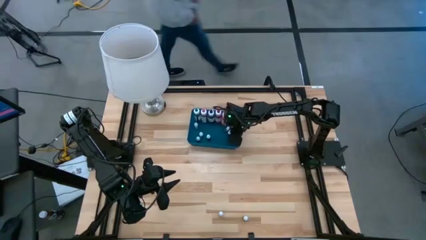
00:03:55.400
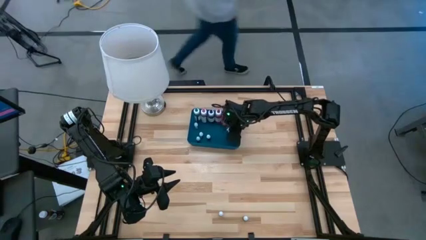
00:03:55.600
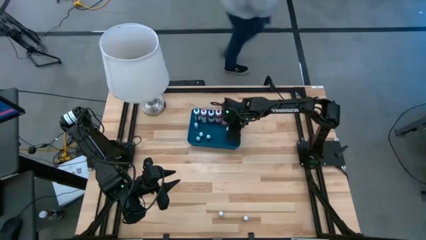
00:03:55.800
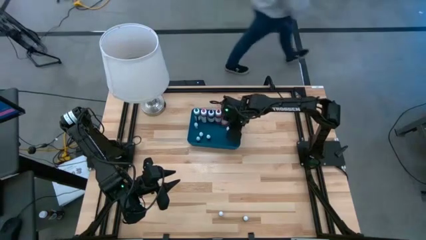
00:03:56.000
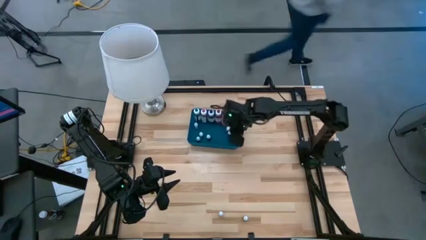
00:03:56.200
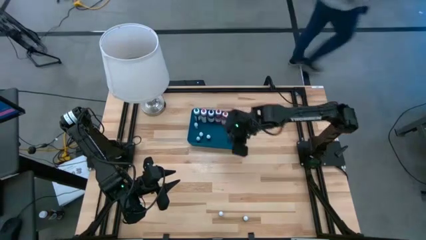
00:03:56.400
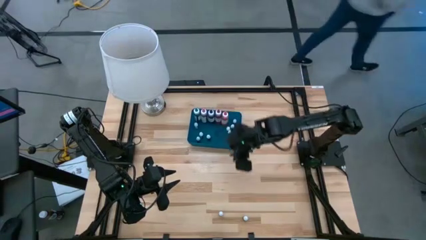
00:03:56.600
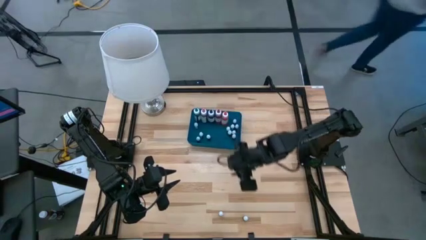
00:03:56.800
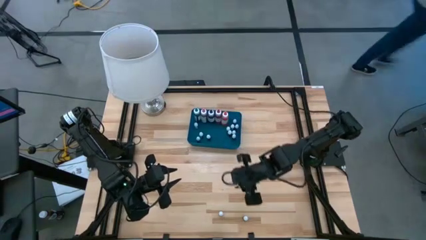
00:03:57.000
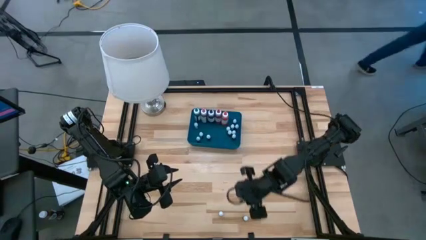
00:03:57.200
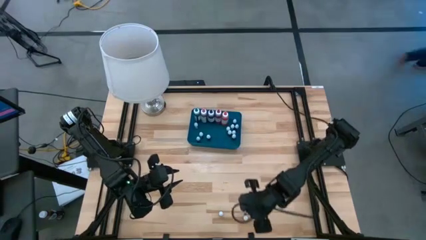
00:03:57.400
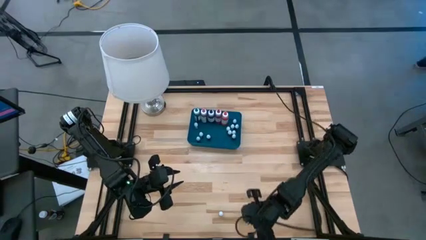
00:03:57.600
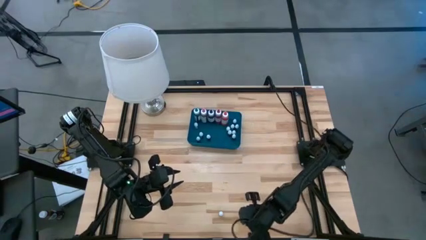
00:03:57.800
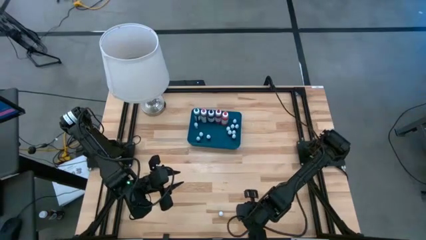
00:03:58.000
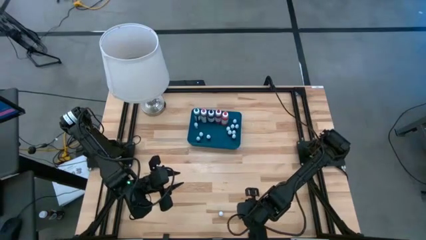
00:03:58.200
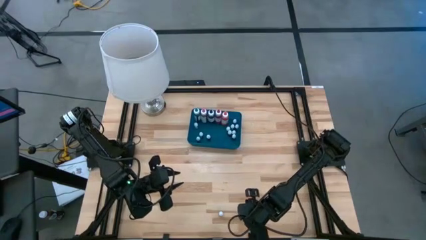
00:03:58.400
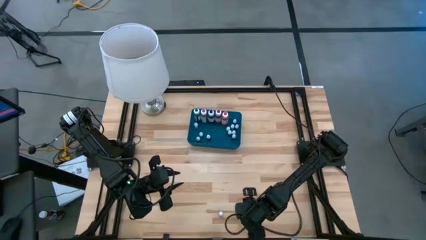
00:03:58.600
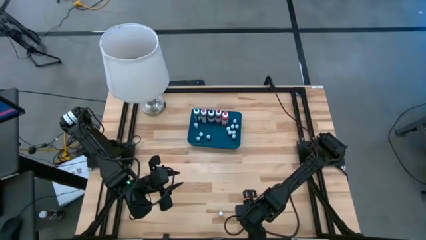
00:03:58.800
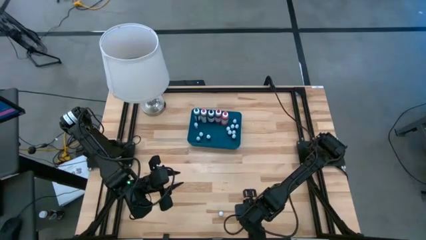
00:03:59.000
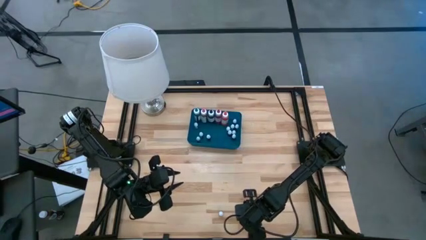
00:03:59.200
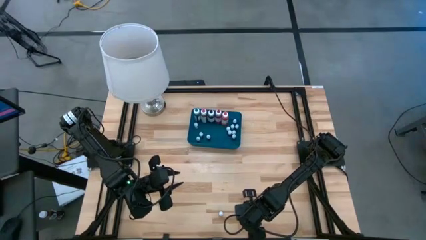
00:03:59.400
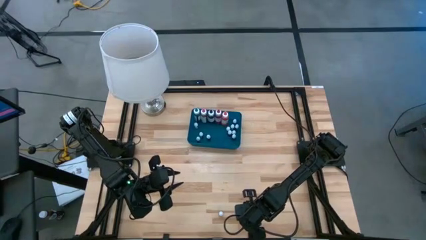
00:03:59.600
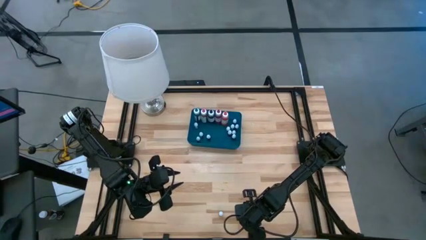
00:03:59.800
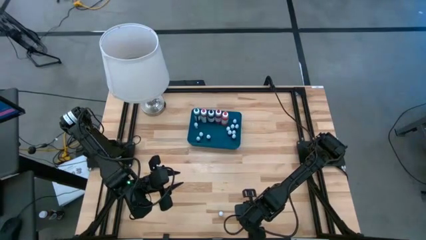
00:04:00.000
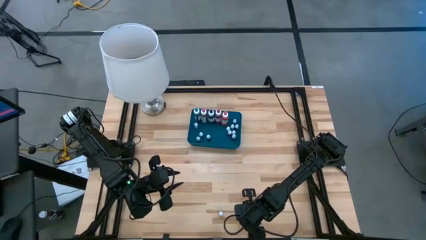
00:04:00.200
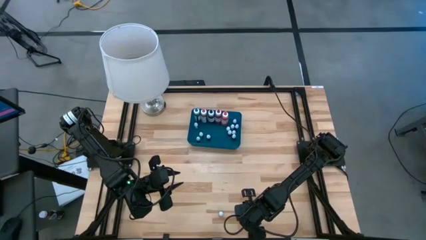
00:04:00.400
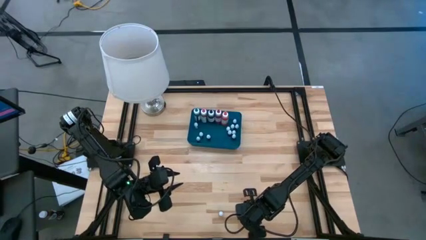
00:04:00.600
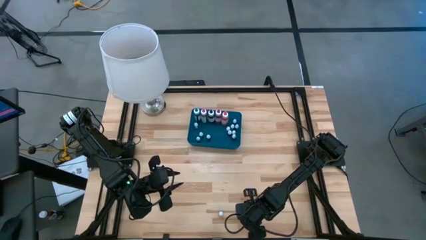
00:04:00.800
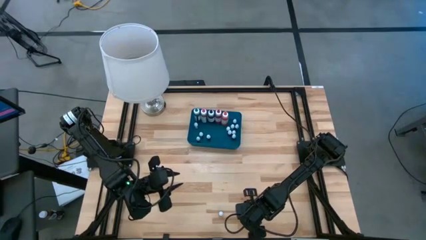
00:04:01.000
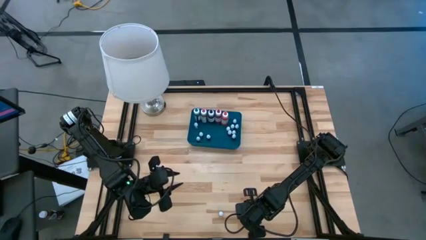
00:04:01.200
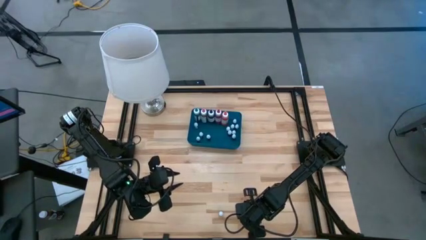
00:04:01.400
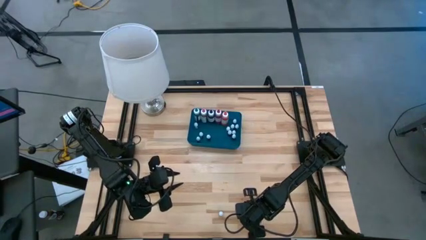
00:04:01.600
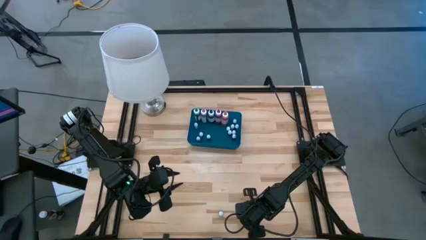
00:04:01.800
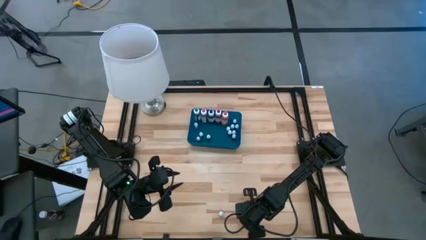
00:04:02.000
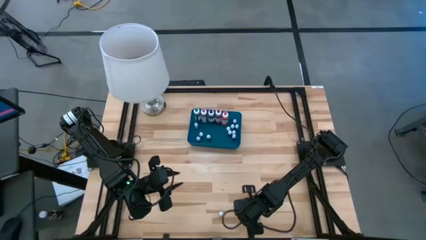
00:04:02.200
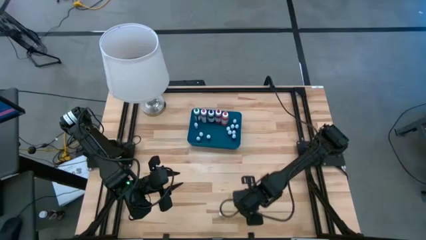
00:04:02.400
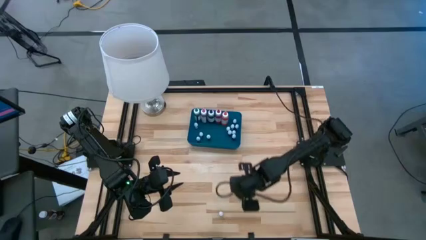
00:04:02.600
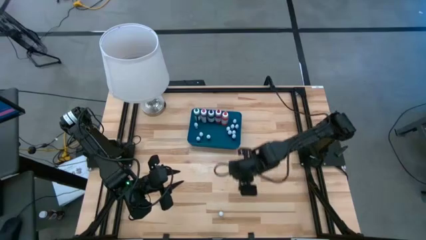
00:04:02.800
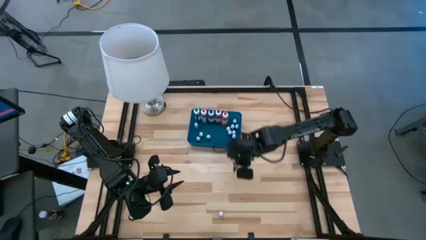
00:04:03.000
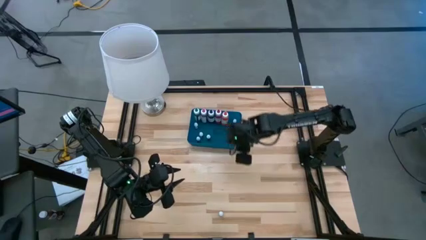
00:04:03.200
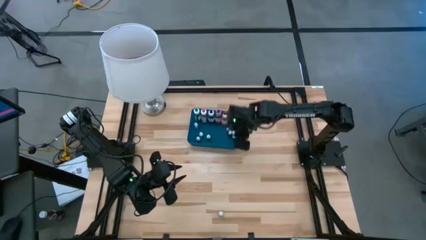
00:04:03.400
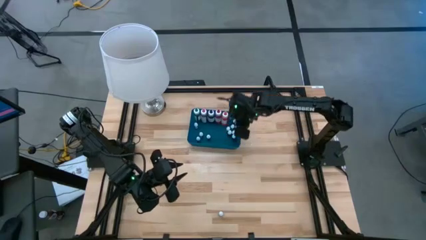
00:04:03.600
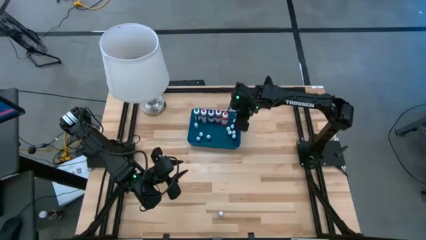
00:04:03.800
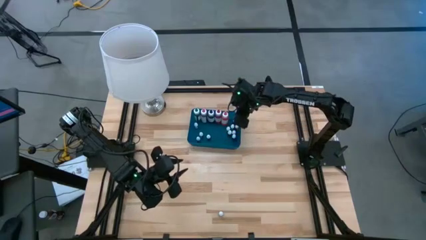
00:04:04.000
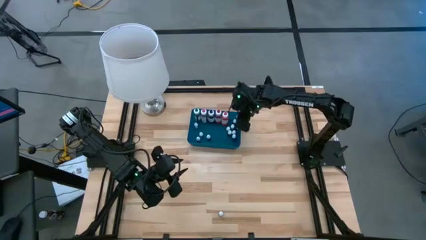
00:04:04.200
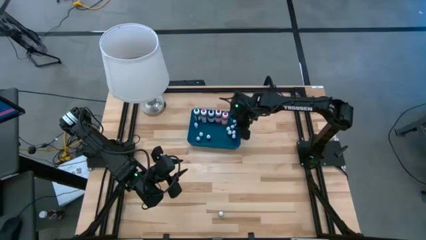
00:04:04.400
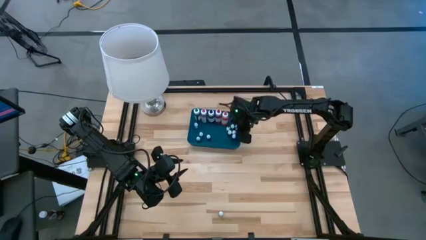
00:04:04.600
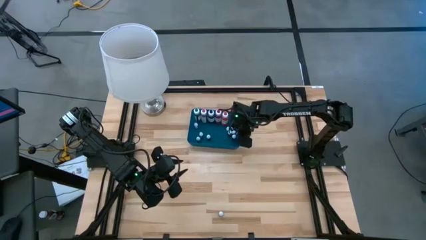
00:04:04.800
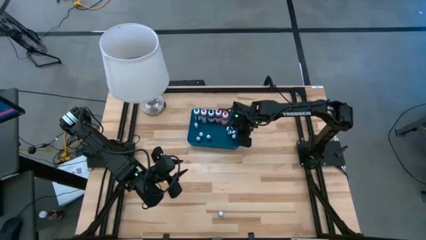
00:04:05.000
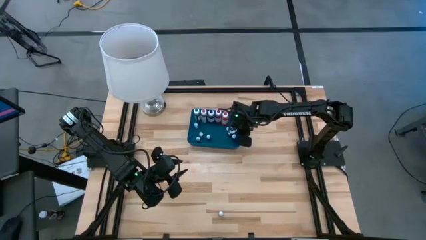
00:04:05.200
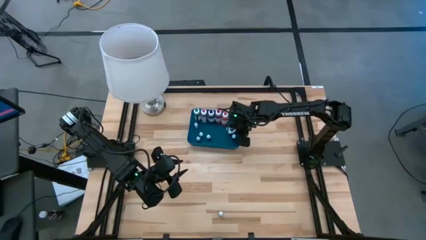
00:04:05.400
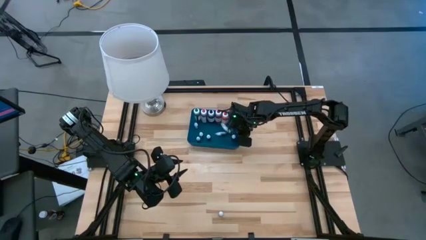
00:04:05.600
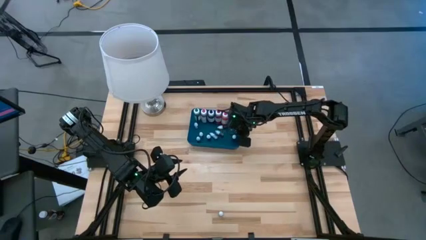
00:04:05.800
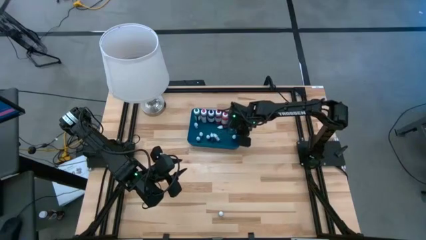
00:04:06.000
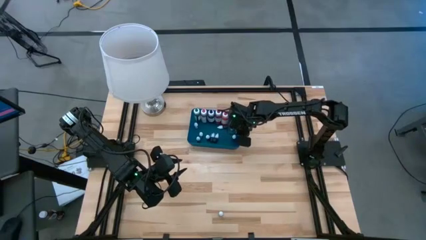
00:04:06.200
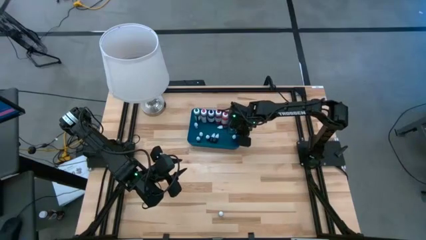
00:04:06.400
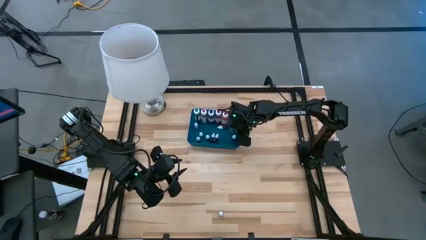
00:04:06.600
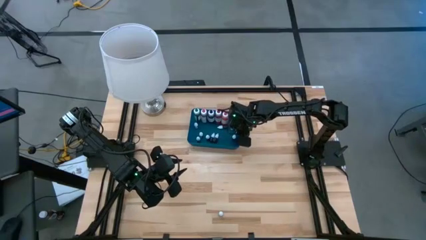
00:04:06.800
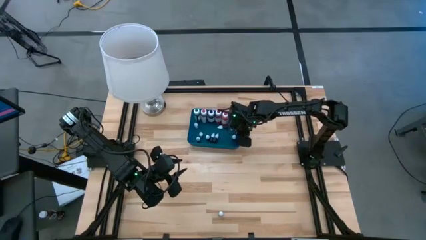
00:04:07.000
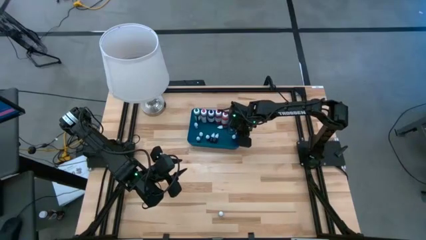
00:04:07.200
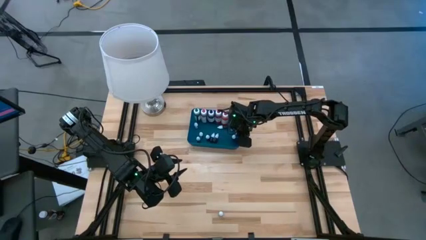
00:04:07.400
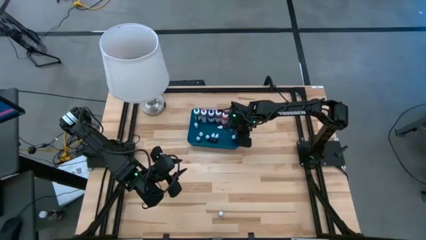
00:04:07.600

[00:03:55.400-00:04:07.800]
Task: Pick & Place food coloring
Put the small black food coloring bottle into the bin
